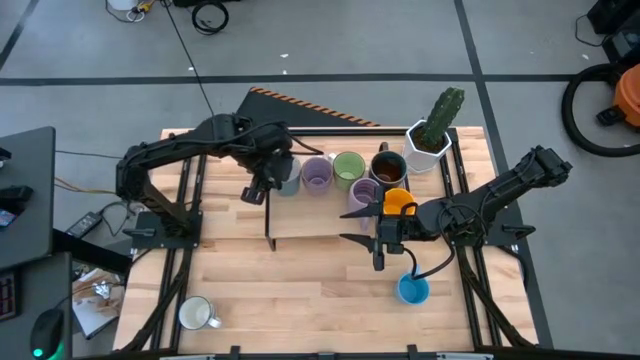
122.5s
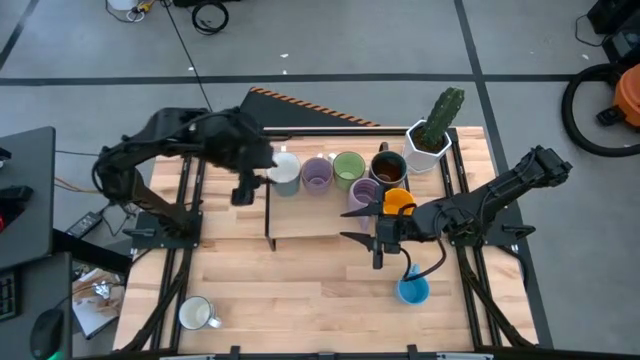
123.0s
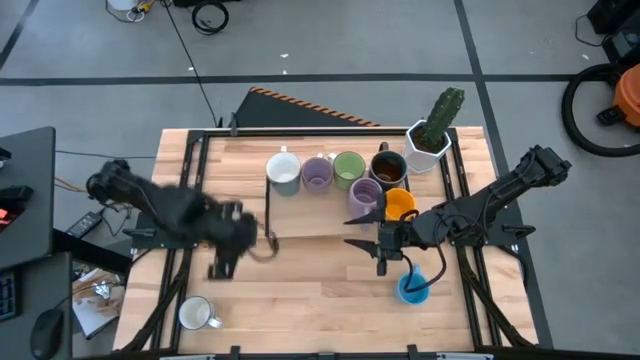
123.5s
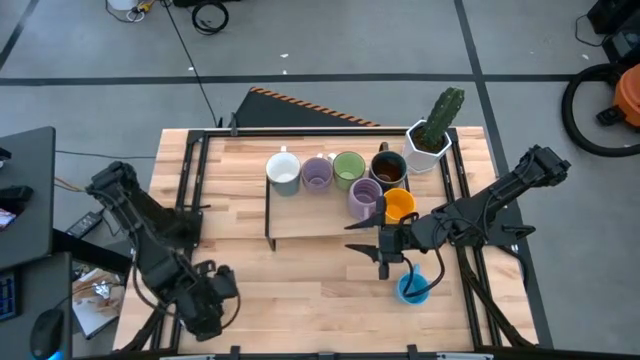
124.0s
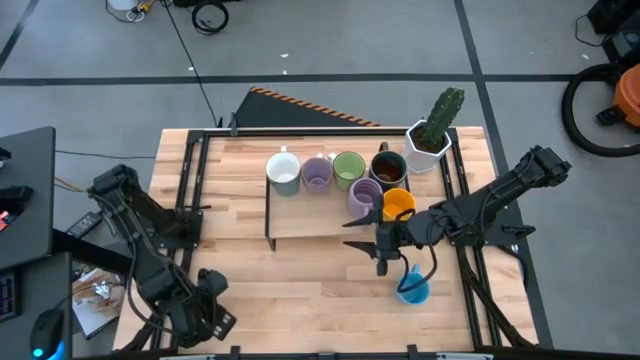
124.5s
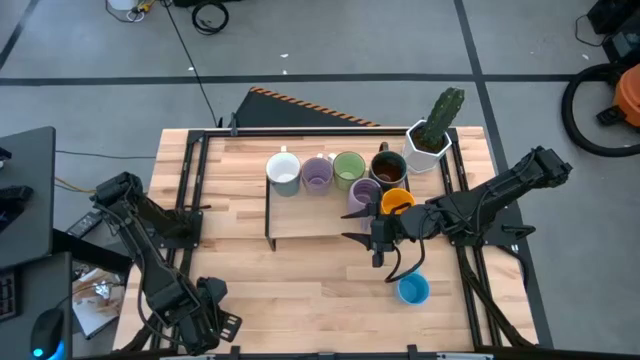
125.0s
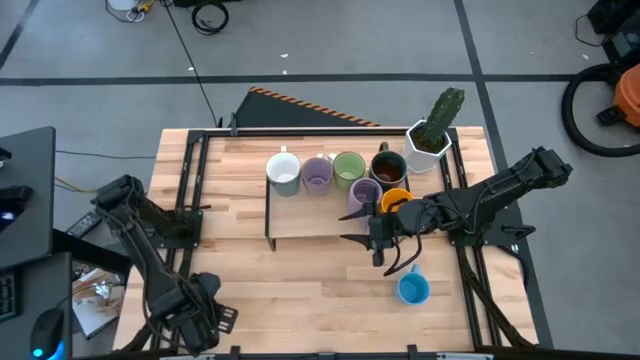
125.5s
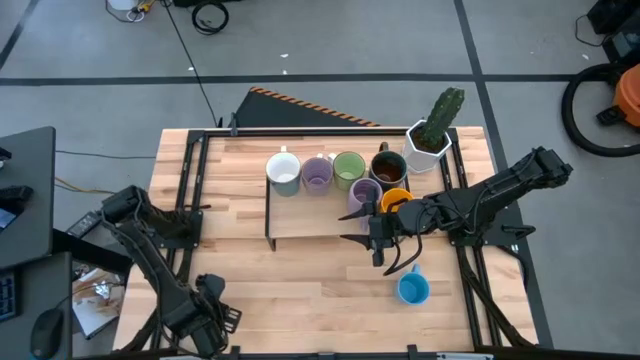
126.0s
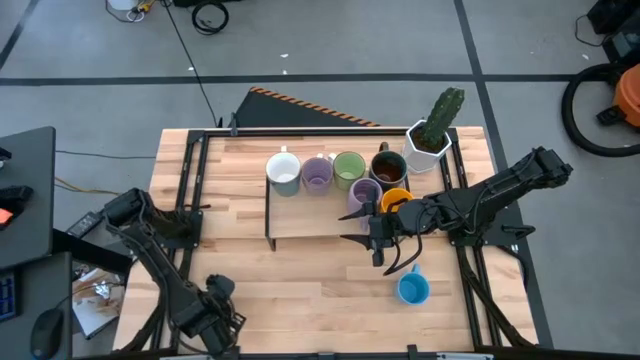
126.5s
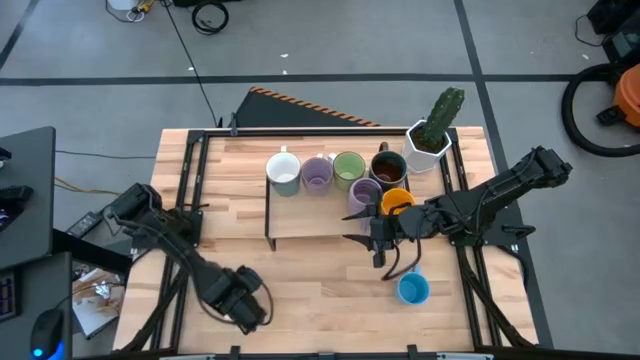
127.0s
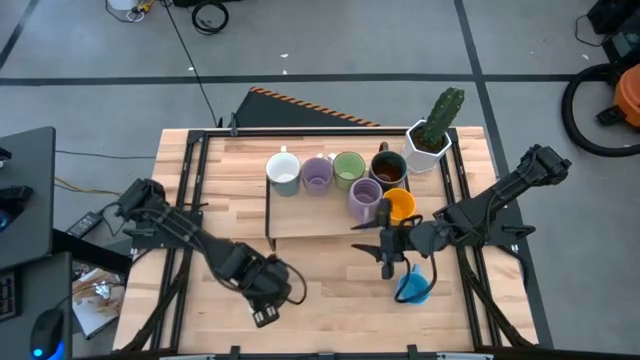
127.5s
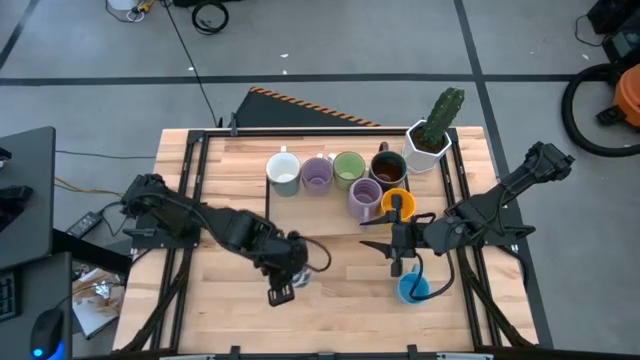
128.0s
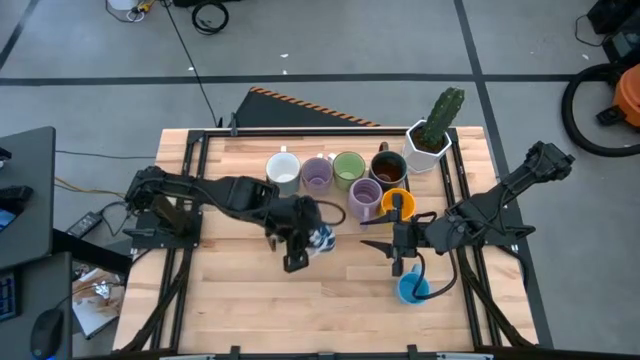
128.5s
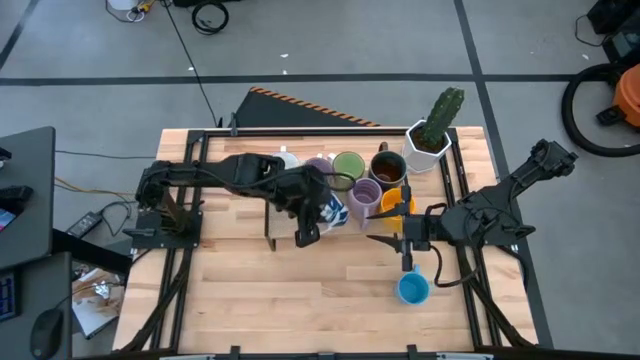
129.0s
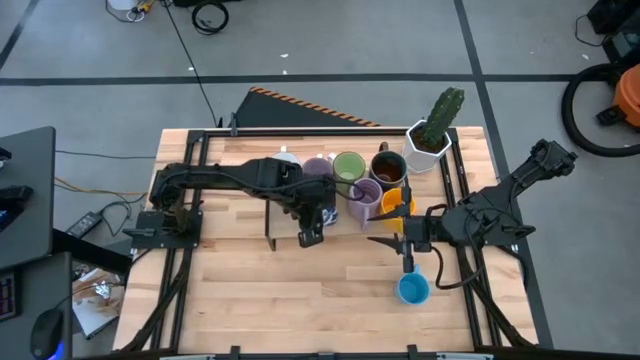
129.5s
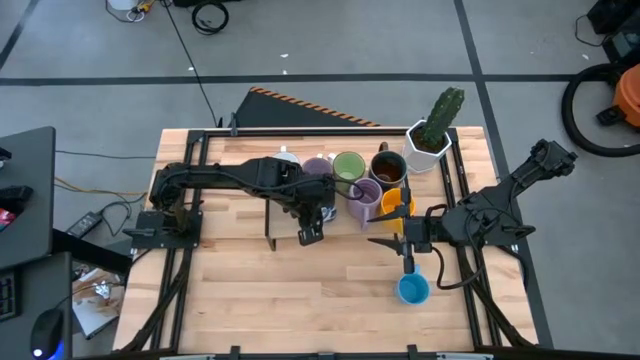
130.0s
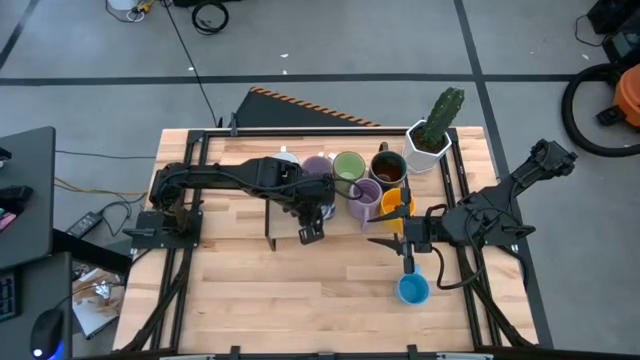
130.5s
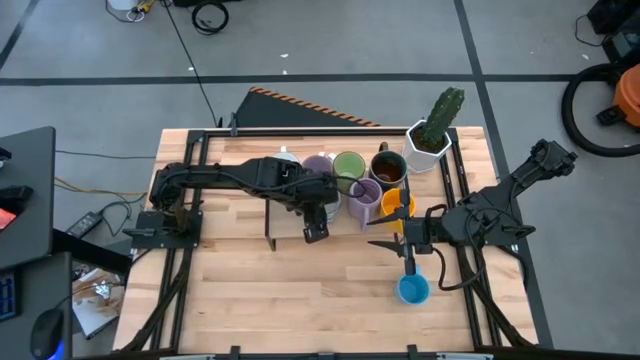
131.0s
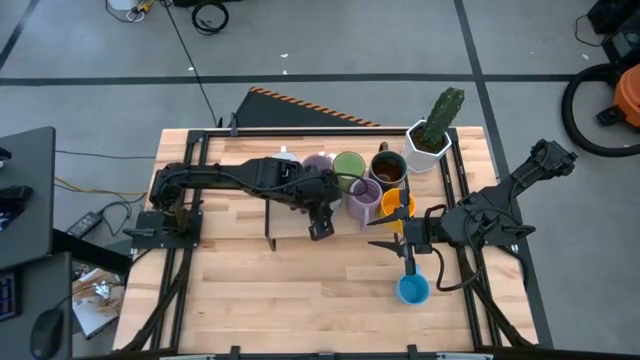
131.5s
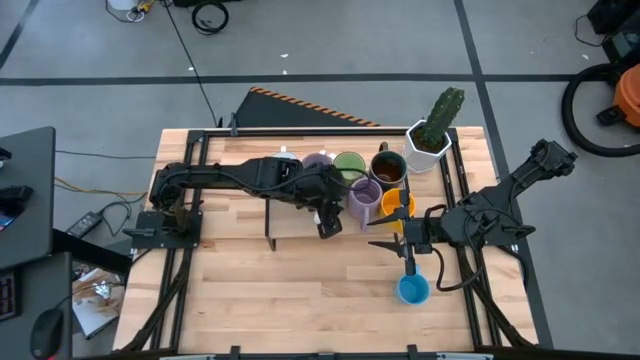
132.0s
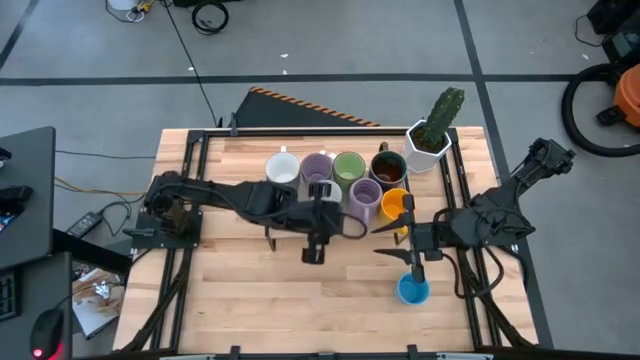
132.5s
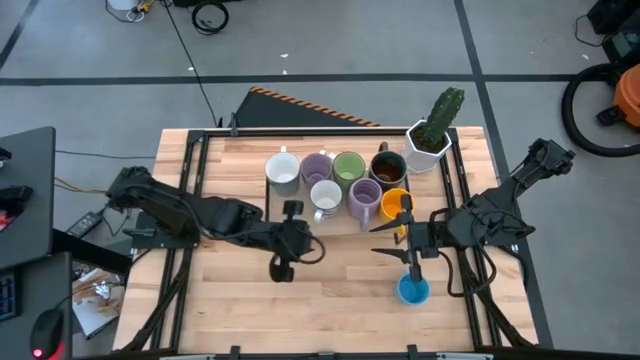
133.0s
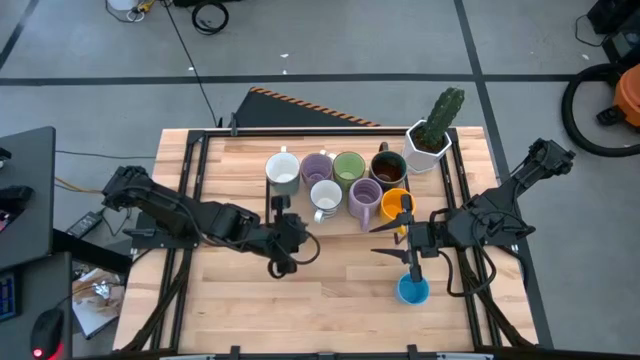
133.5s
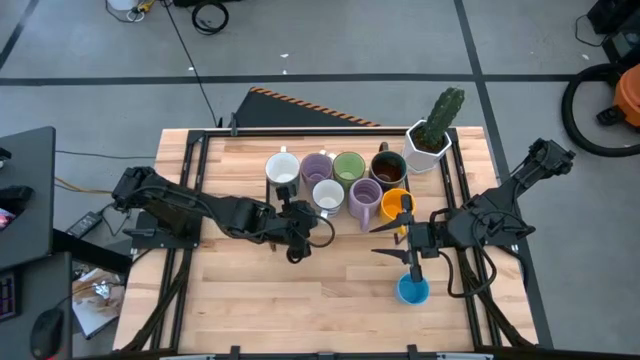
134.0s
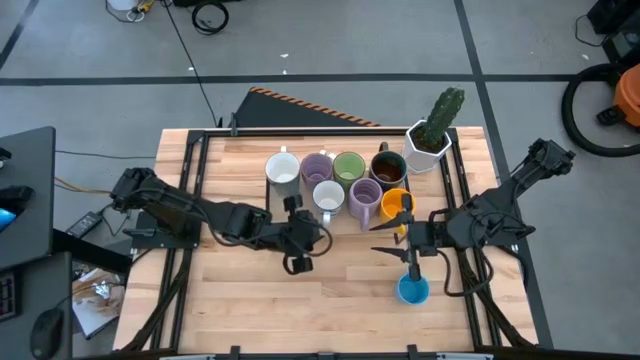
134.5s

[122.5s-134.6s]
Task: Place coffee mugs
Put the white-blue patterned mug on the shelf
